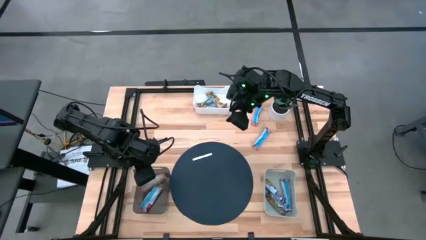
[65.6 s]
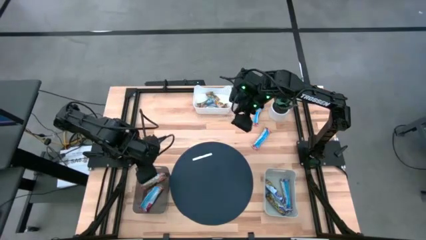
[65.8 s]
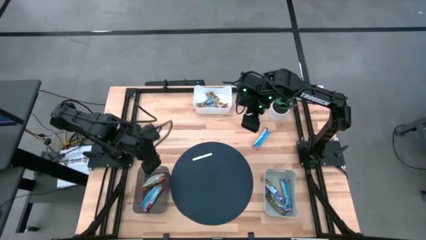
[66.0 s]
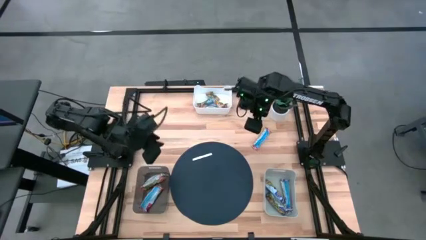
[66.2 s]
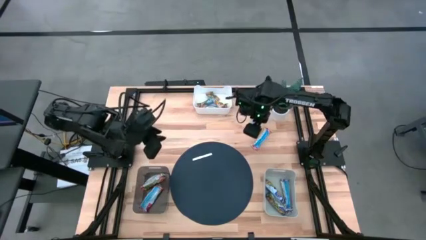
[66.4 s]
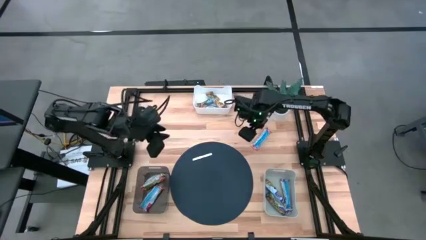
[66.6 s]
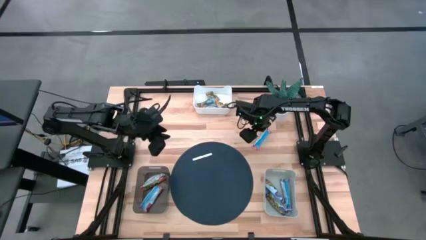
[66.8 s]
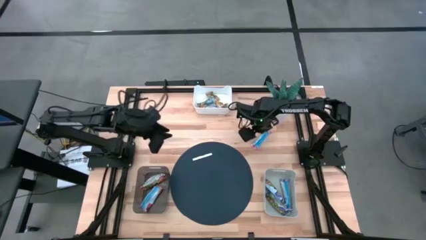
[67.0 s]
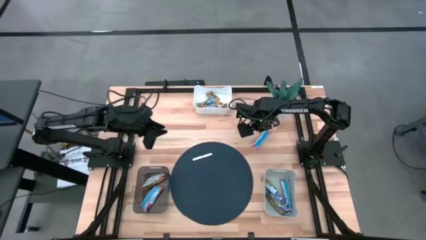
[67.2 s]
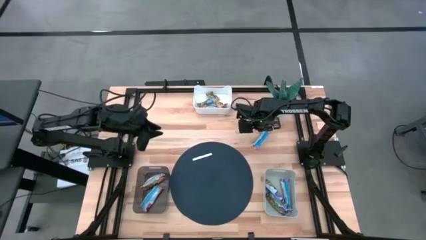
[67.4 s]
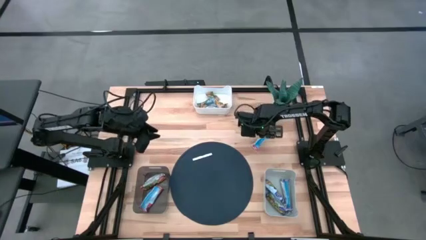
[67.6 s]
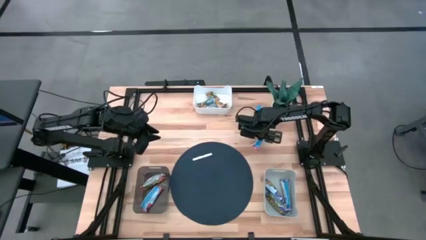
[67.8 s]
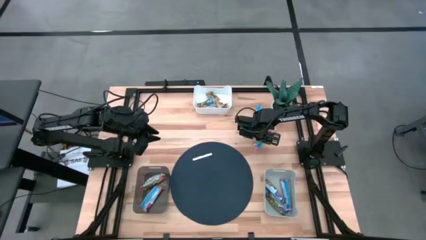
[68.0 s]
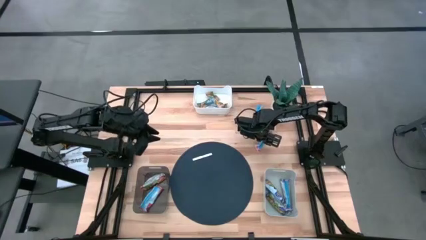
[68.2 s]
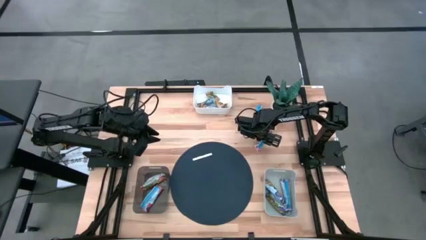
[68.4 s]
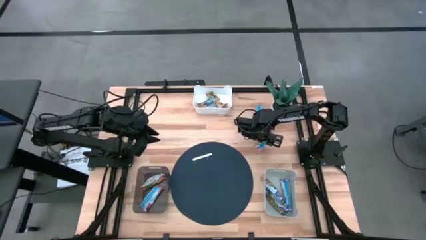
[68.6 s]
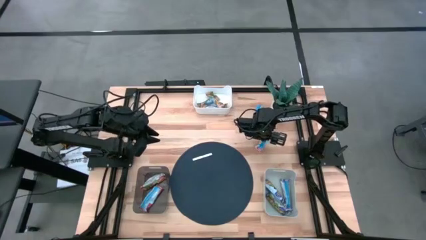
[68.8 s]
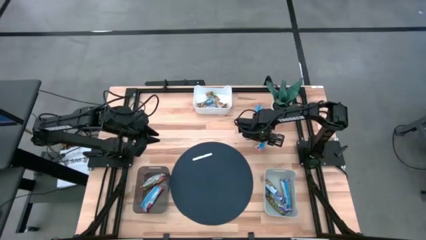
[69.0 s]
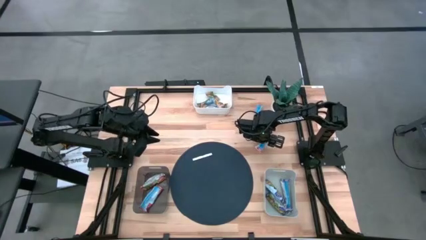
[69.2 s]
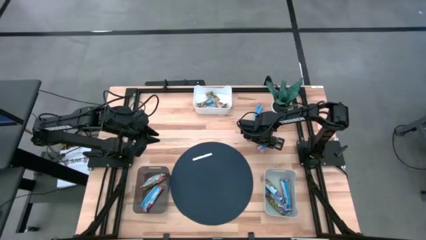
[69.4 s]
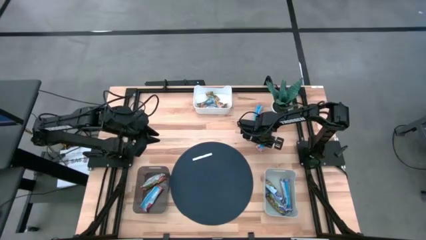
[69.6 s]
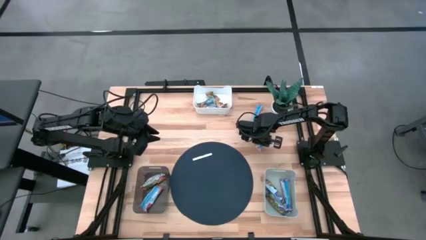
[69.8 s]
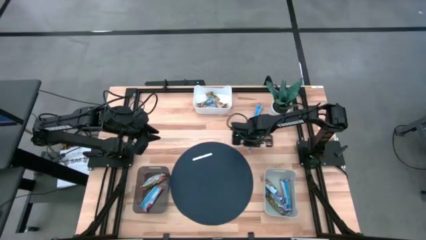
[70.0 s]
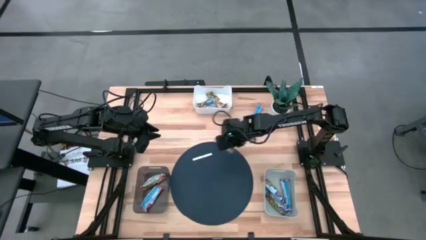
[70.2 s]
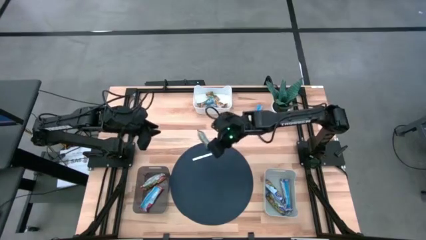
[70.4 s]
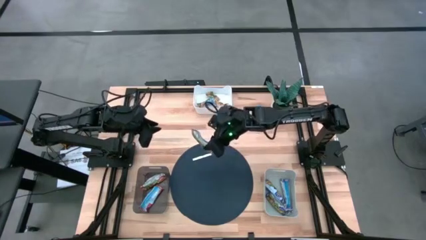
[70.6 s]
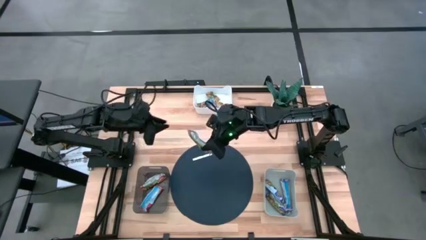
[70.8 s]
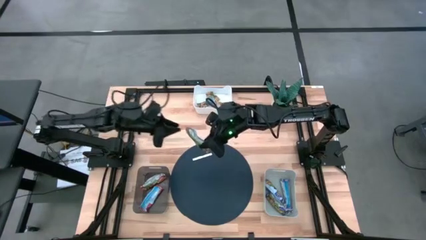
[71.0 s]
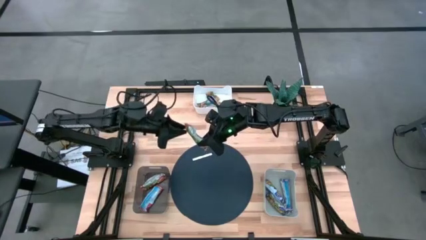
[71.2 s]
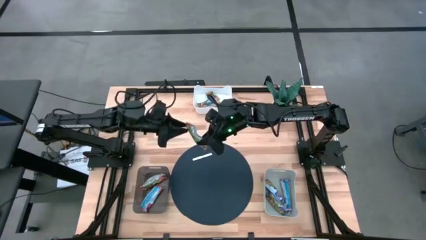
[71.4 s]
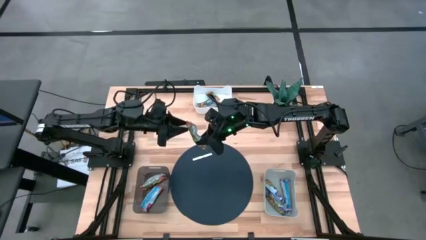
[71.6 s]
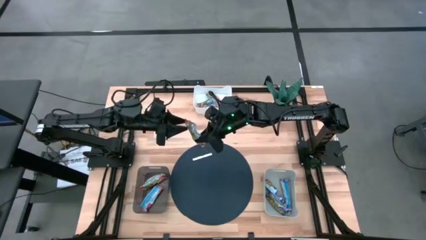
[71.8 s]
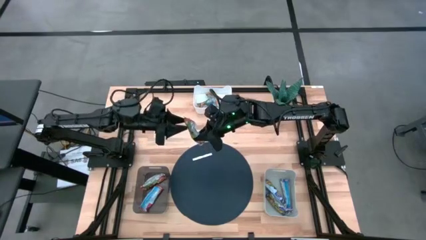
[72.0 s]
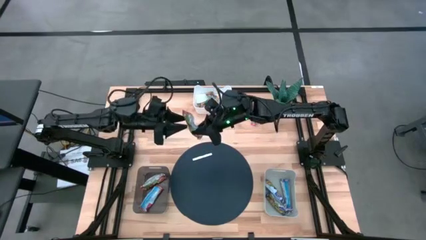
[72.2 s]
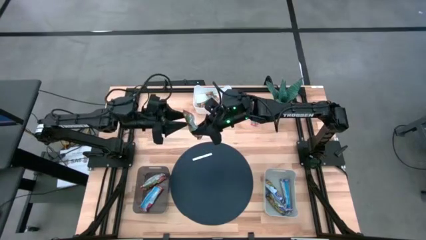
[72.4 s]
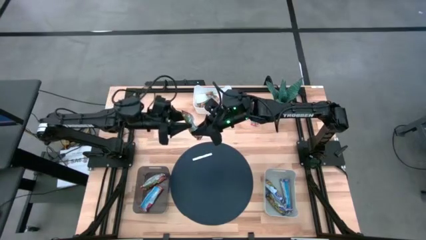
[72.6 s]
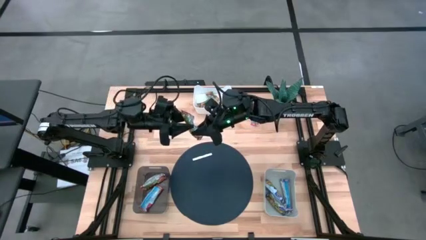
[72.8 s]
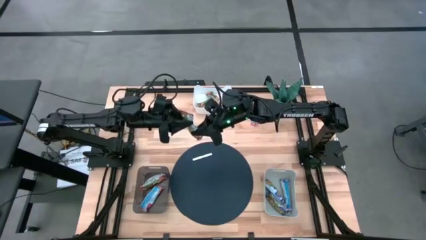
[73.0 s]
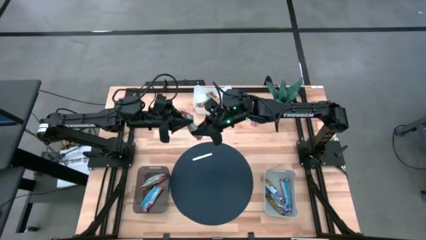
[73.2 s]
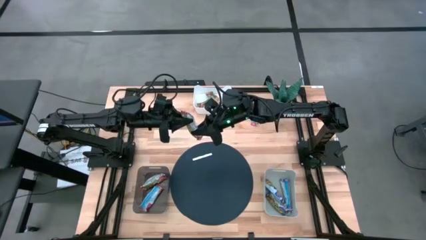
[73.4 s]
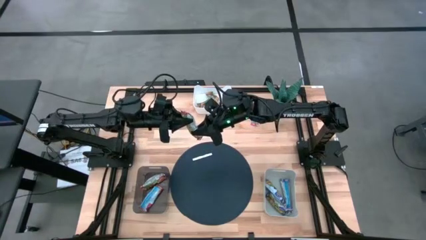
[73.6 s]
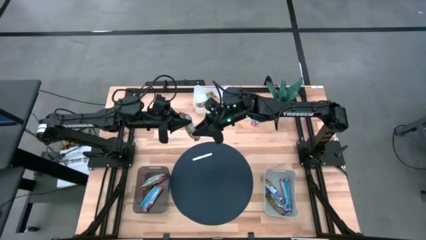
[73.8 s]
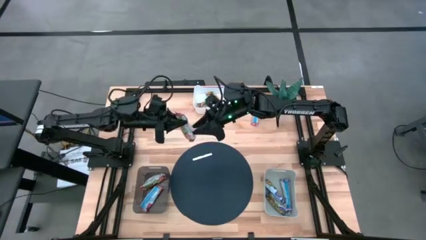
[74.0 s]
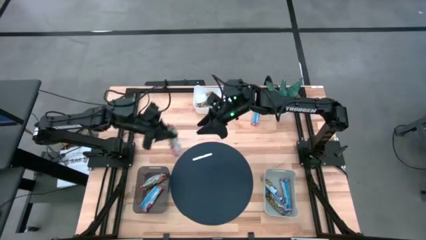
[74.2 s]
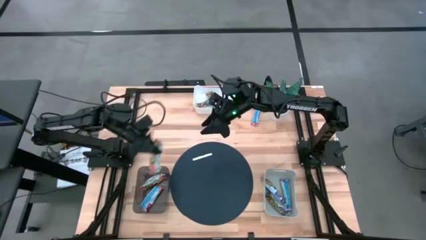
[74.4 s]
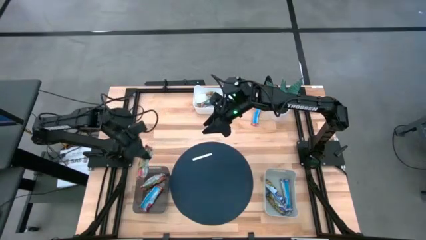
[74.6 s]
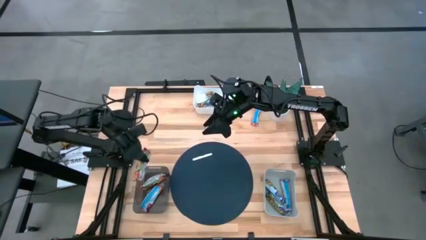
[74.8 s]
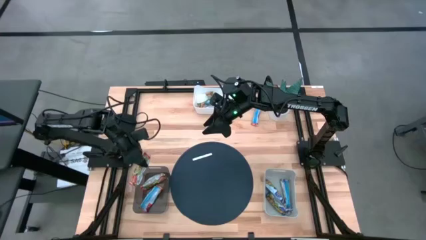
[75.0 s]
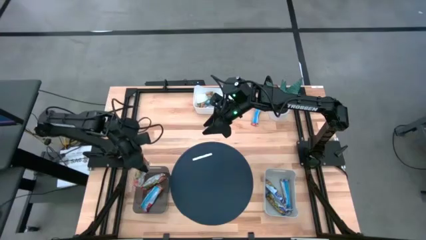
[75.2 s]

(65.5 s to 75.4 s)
Task: Pick and place Granola Bars by type
Put the red granola bar into the black bin

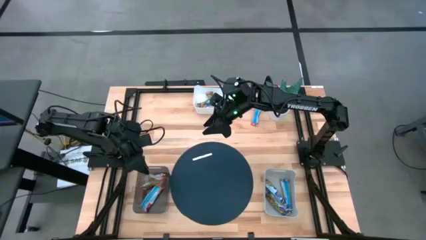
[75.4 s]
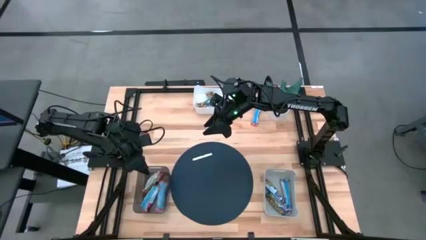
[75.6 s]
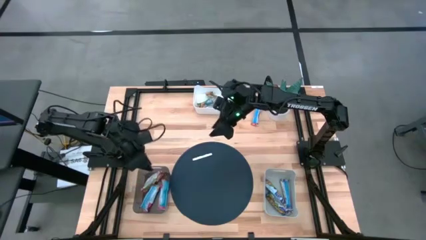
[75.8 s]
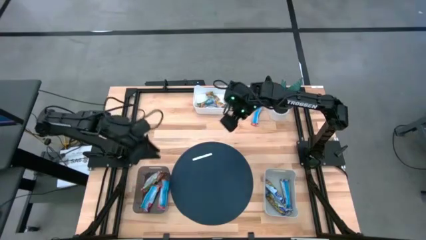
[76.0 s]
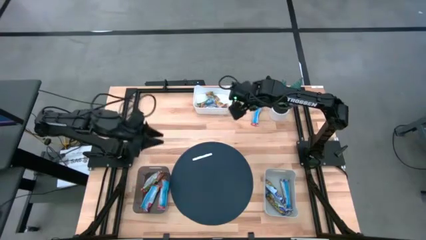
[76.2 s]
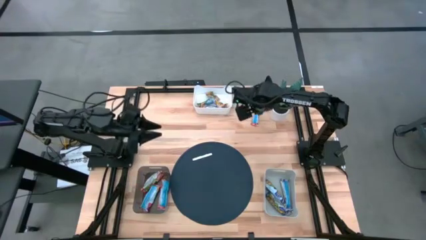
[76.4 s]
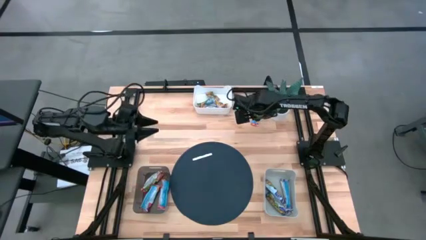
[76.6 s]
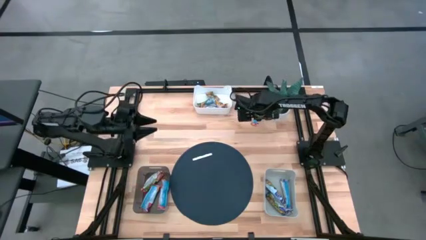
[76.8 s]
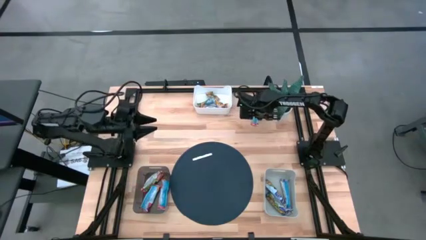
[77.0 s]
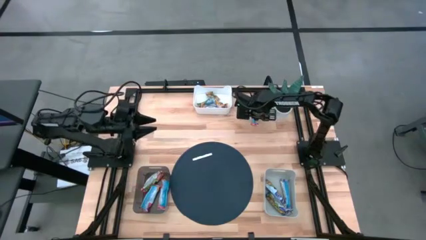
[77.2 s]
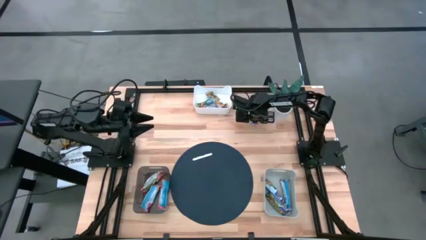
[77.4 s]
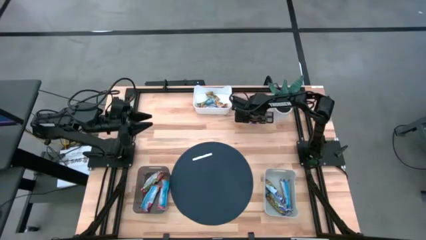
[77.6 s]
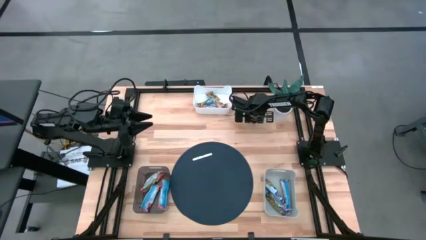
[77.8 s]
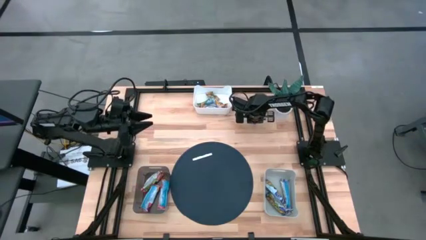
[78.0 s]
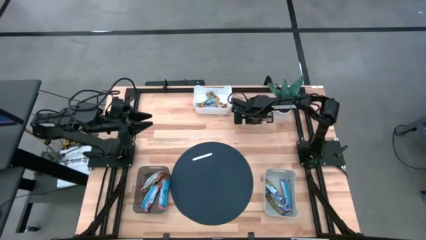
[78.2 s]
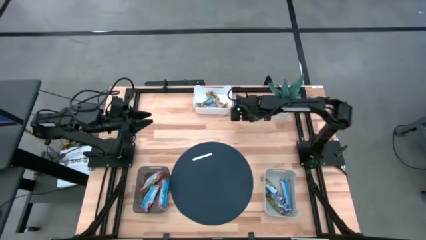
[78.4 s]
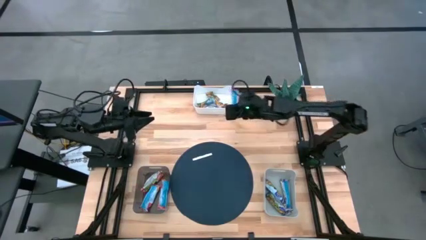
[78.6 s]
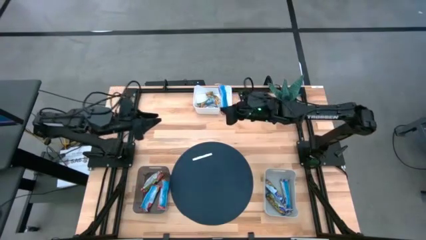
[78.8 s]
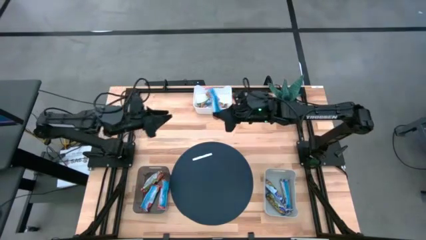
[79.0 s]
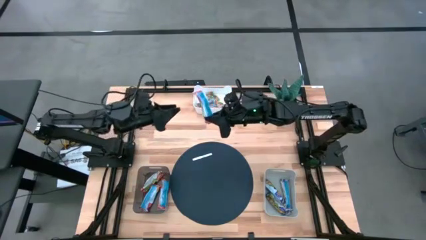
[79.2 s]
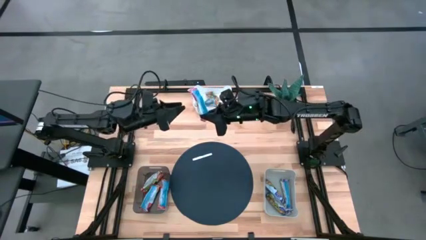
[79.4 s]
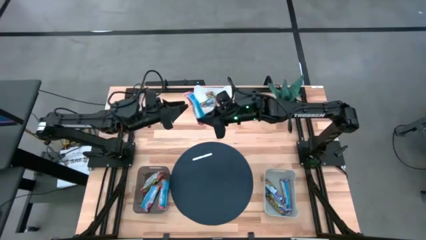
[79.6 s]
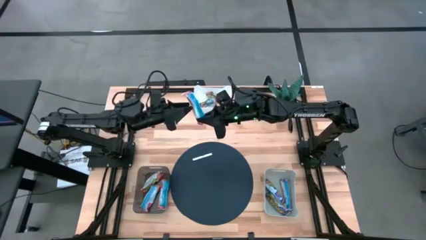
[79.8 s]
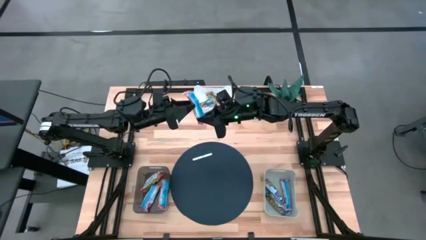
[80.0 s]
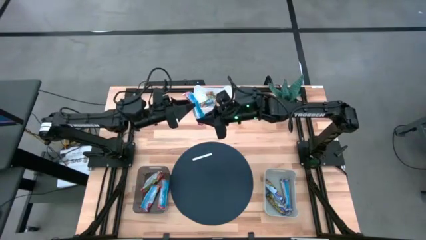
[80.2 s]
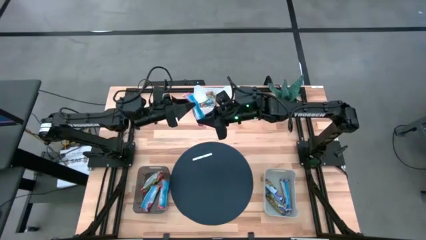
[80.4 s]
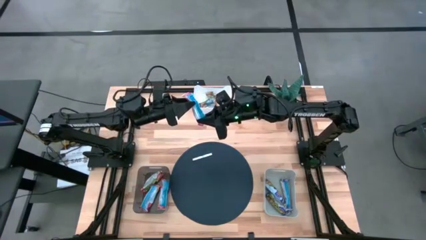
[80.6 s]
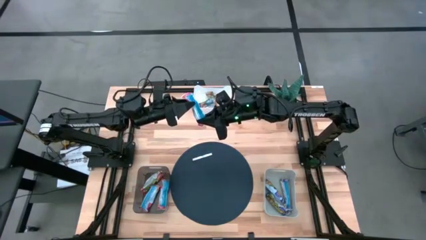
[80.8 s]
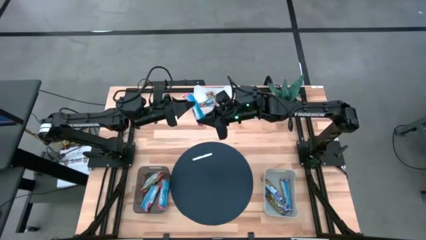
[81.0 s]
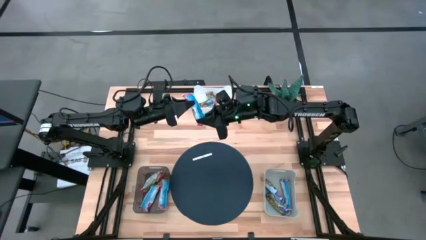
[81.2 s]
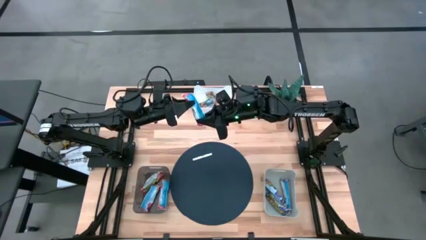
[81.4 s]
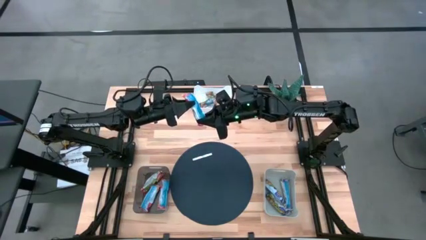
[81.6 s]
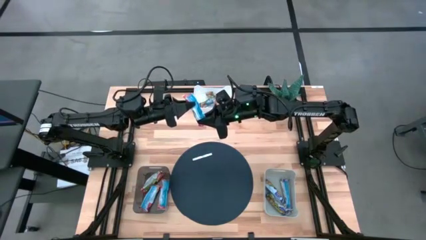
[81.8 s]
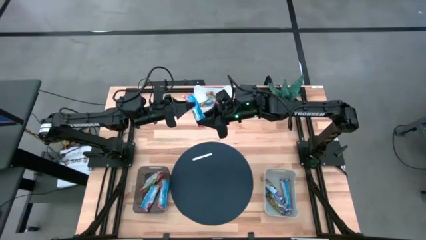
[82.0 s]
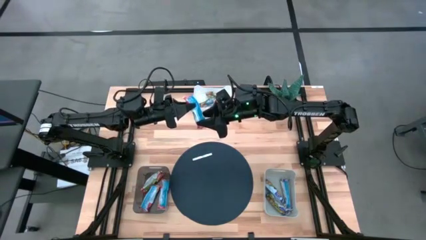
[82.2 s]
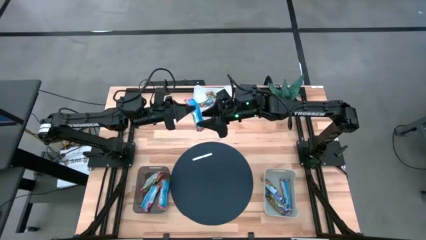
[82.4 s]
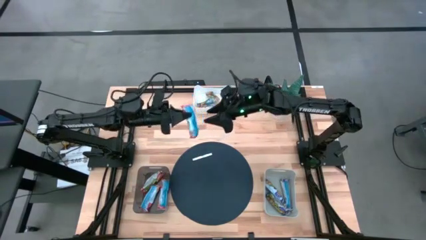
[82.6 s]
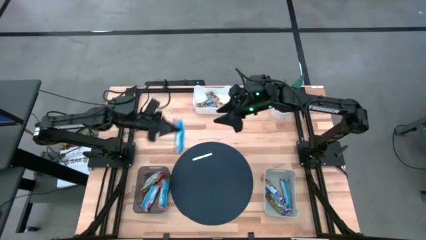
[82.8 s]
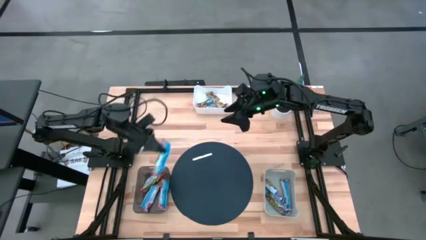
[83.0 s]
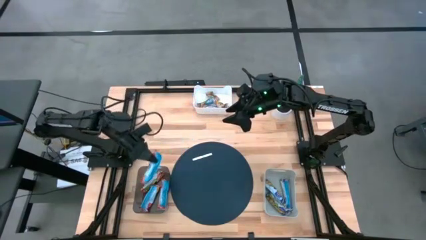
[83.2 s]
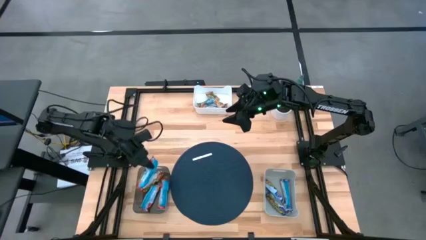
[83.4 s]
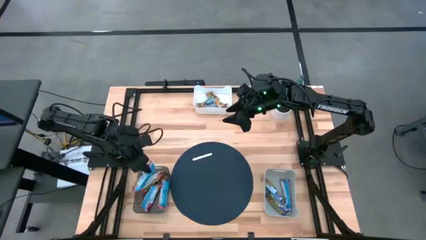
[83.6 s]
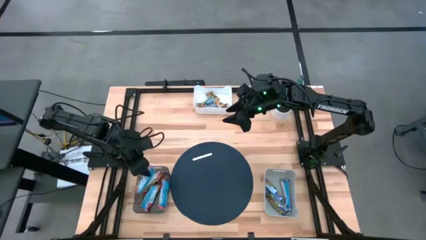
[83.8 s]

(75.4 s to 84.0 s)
Put the red granola bar into the black bin
